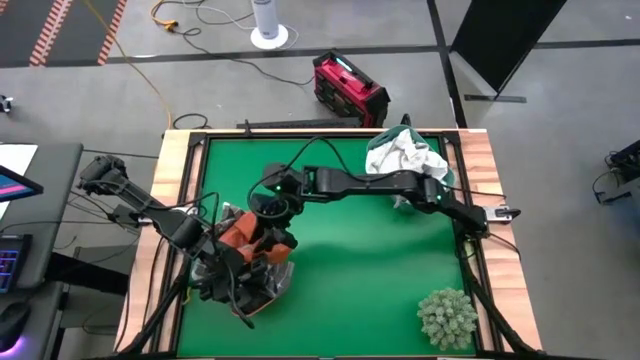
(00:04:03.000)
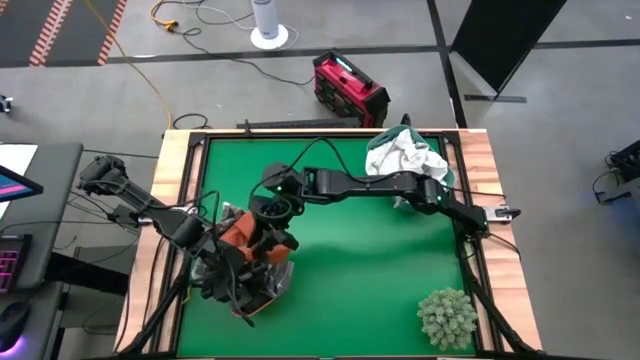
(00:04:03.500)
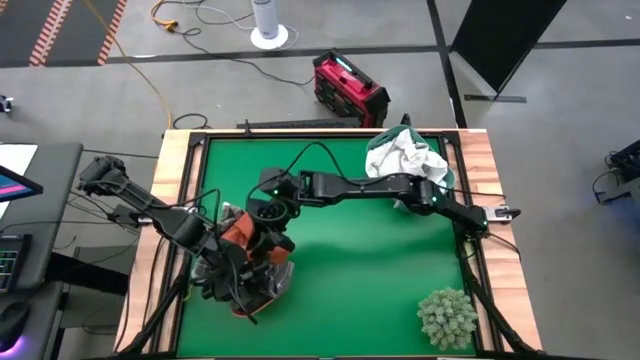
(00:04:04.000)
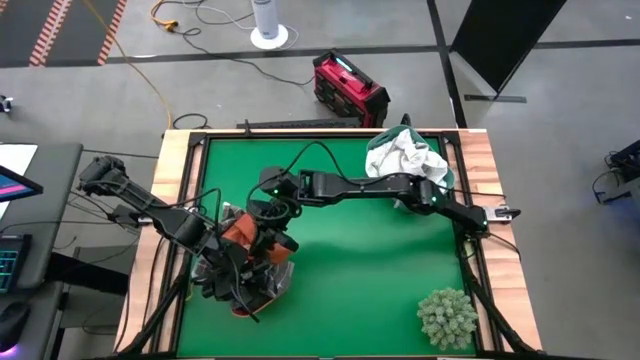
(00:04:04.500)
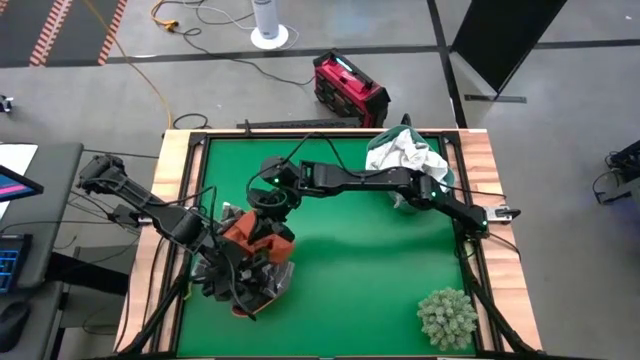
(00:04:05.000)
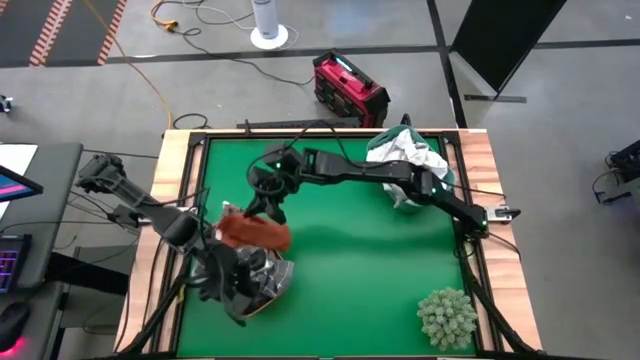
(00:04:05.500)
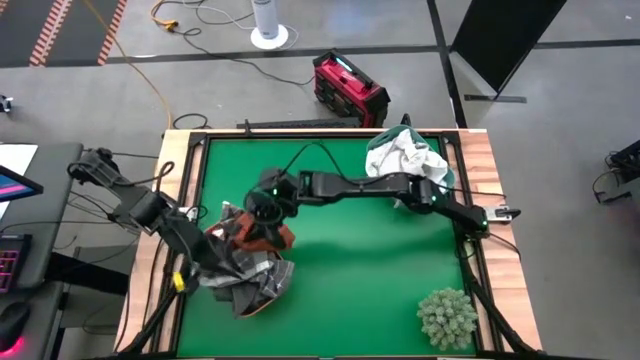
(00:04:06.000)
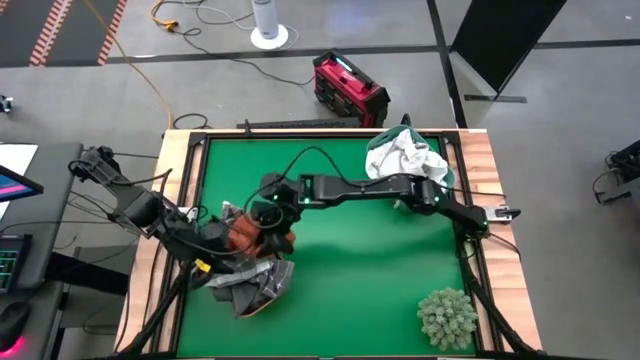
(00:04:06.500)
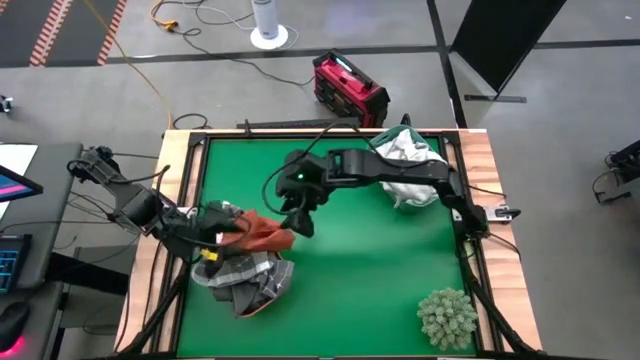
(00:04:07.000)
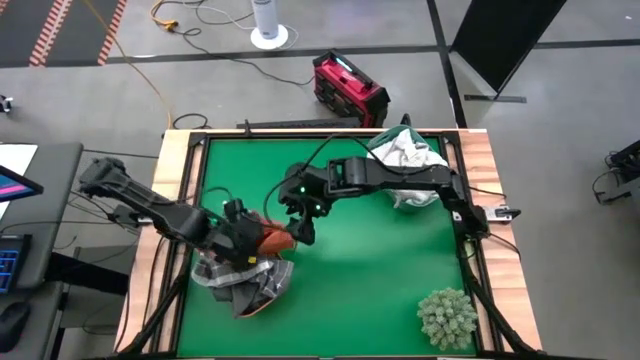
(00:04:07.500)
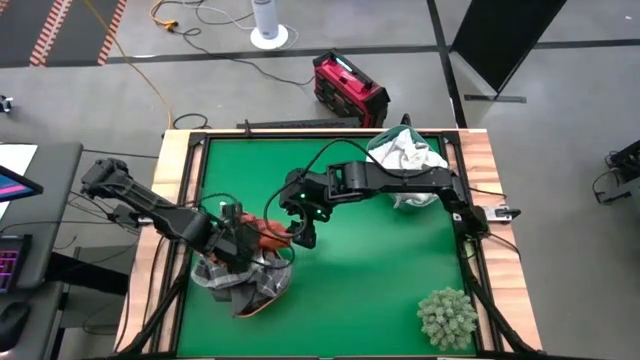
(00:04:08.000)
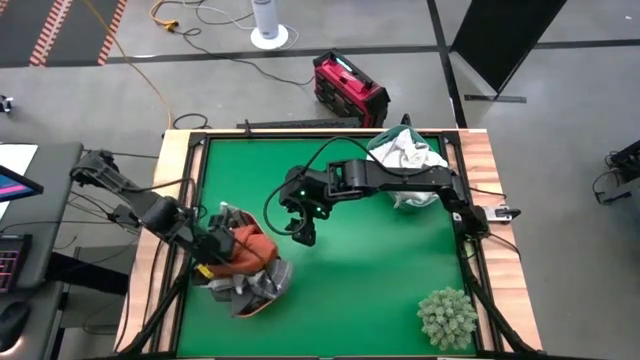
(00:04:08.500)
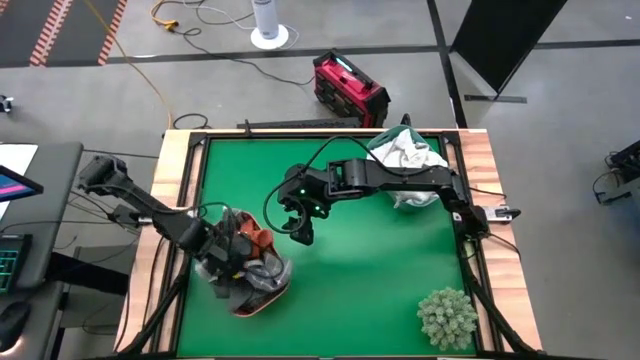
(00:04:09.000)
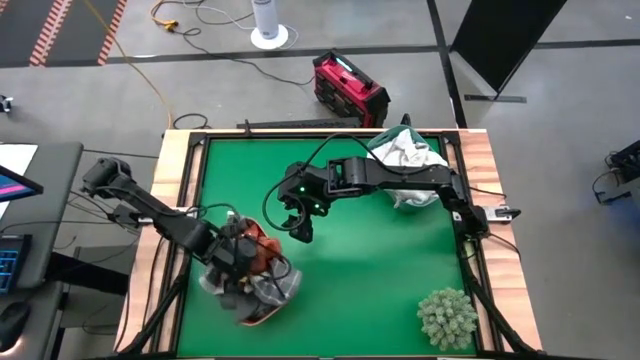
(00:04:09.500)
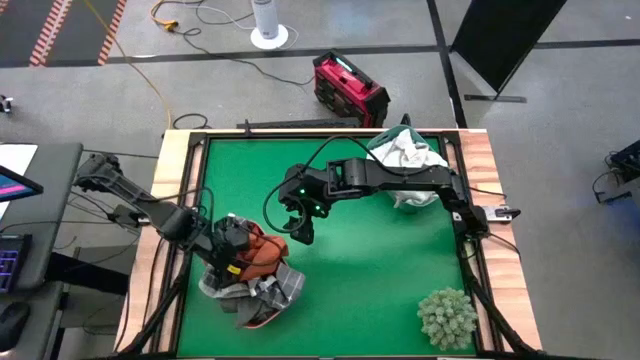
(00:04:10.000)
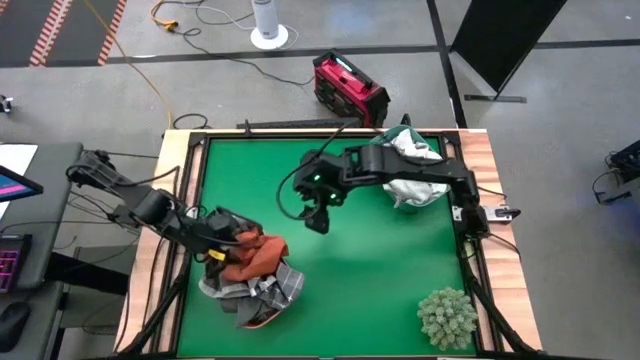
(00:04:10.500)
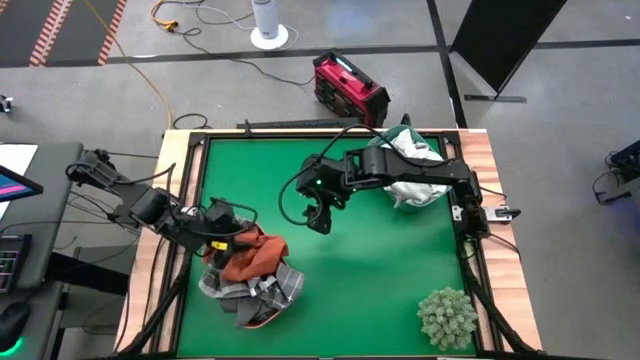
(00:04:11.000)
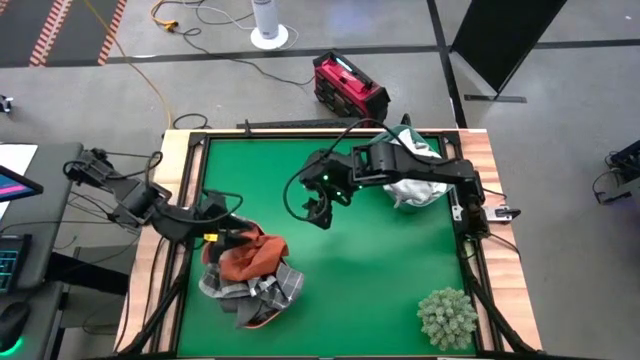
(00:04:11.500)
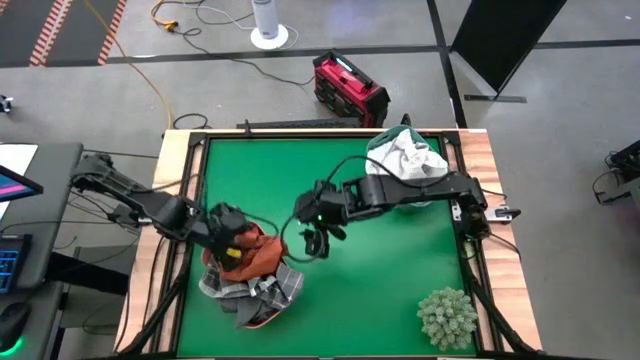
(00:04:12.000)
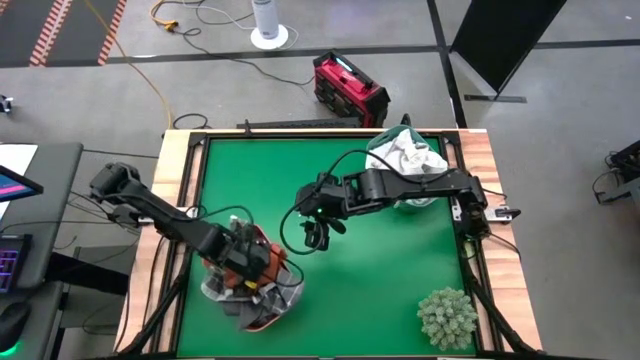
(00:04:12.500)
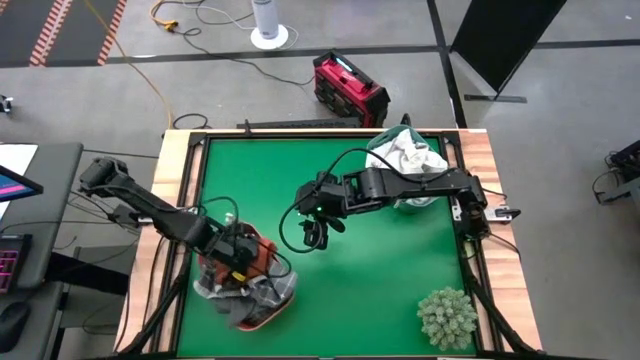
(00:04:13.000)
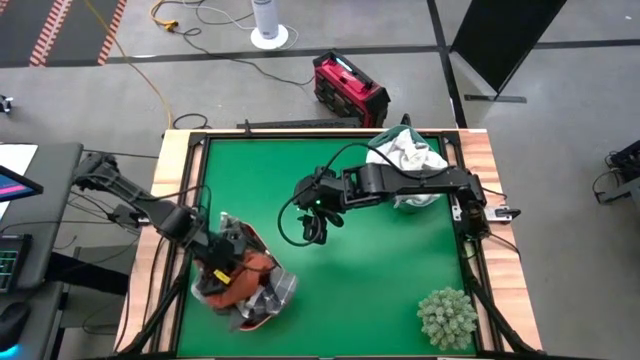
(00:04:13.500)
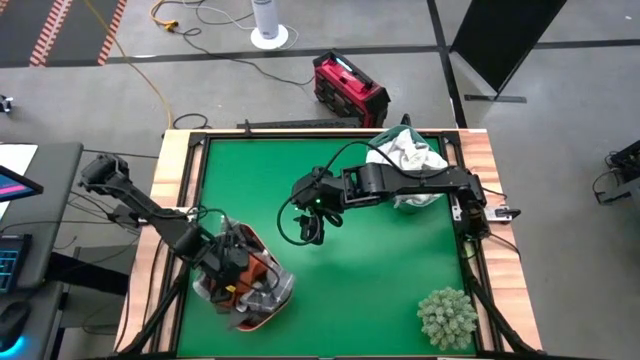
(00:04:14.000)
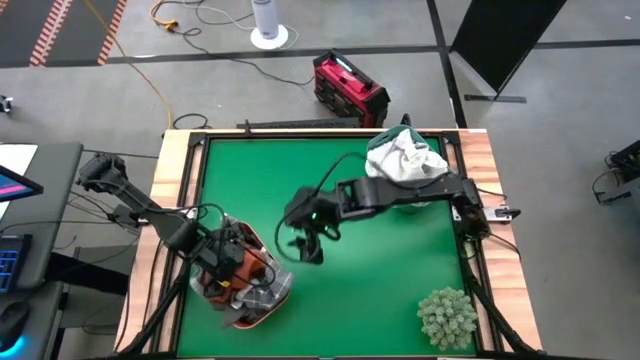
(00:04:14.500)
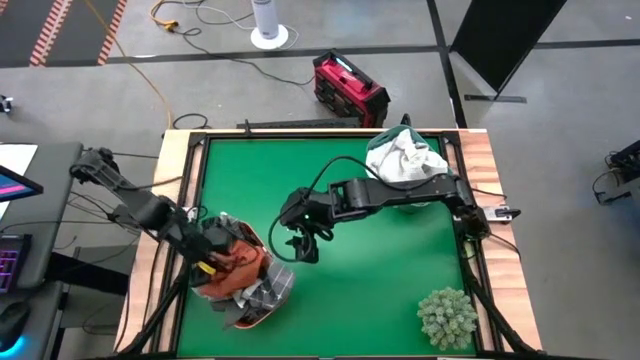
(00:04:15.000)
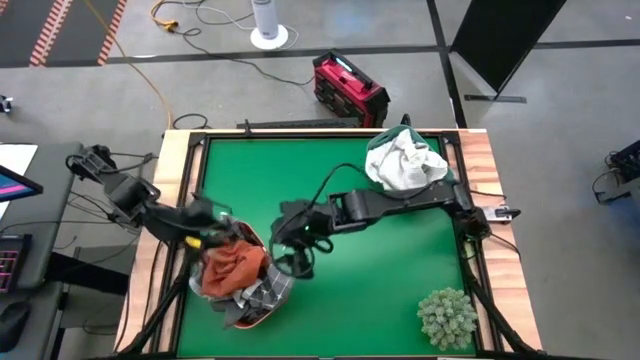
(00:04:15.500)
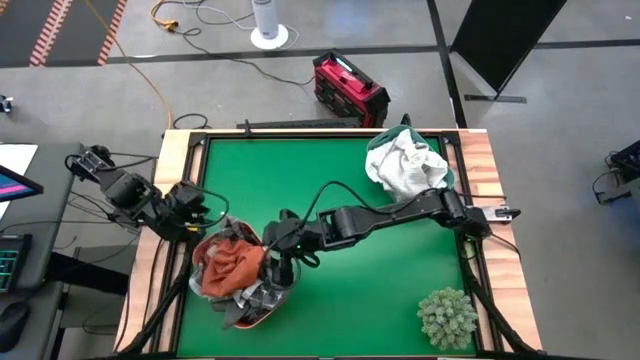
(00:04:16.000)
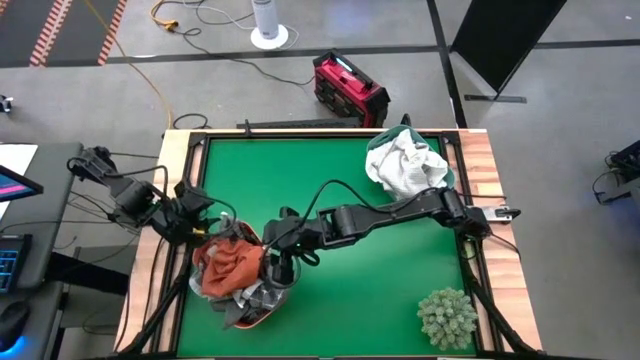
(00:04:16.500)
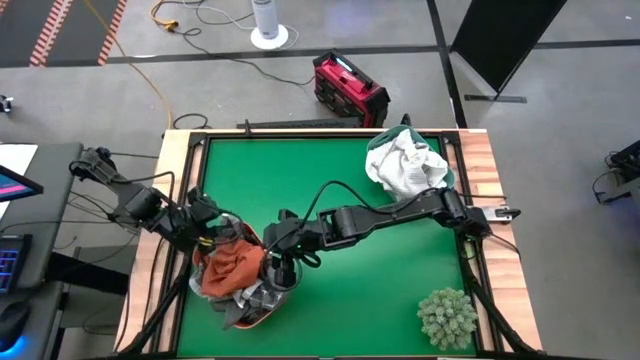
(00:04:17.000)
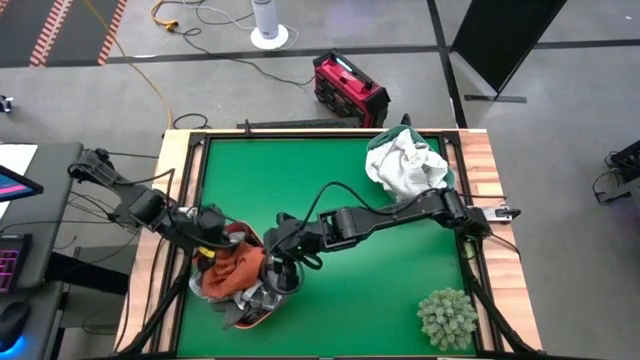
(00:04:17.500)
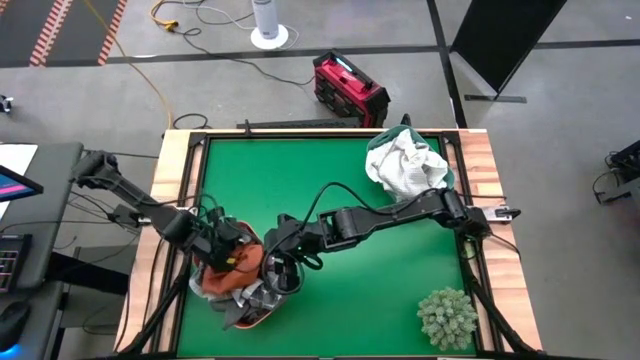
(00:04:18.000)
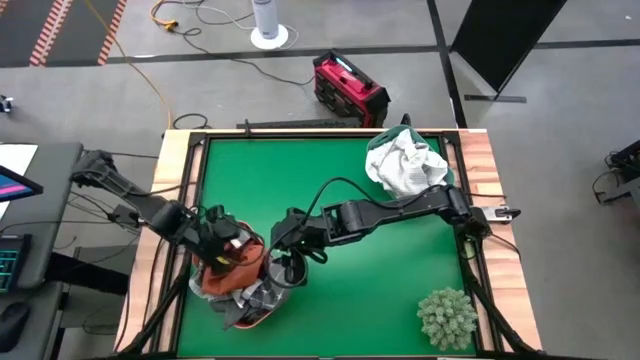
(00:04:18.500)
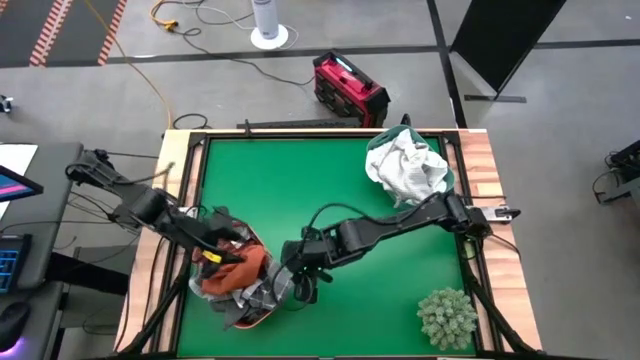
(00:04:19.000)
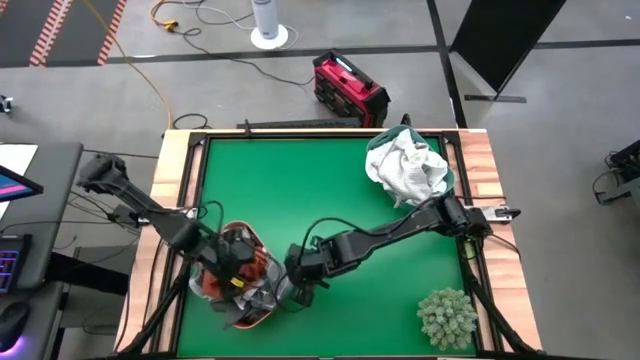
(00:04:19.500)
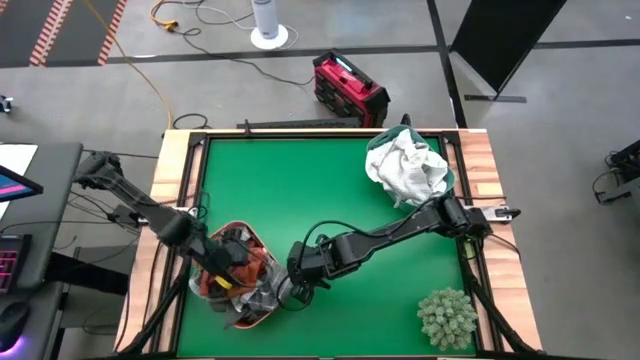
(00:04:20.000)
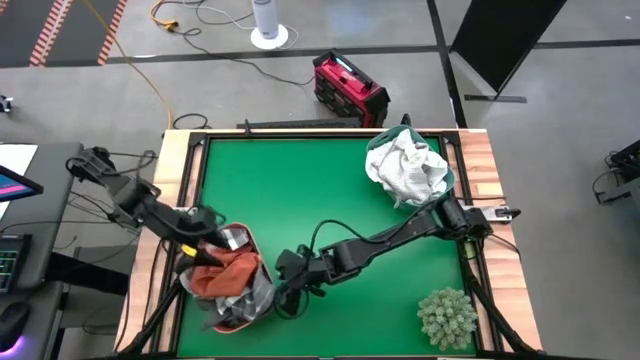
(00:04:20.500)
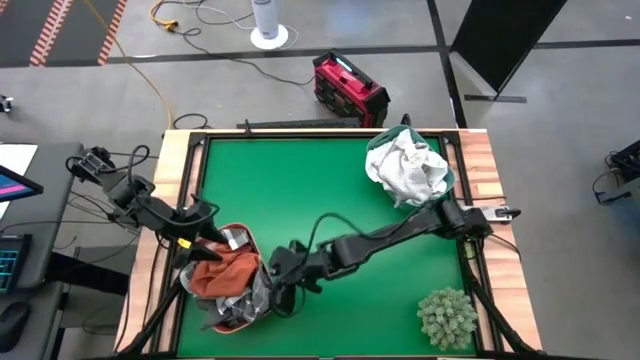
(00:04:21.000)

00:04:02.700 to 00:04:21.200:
Task: Sort towels by color in basket
Adjust the towels in the orange bin

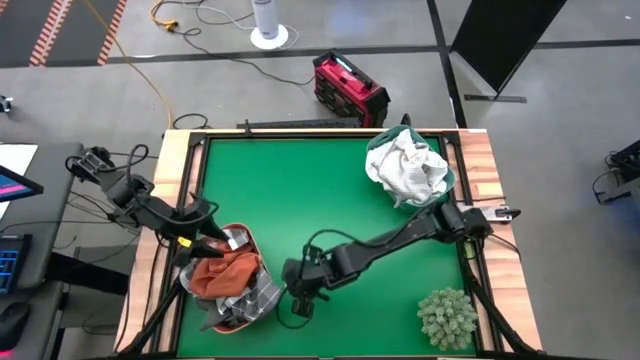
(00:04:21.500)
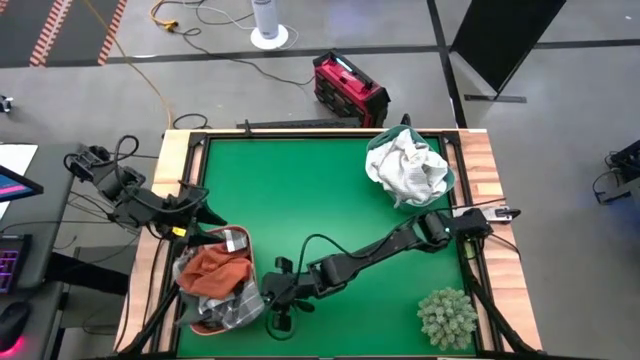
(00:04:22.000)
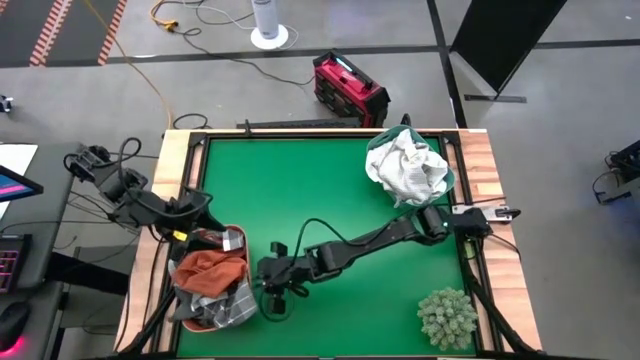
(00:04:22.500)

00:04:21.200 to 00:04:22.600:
Adjust the orange bin
